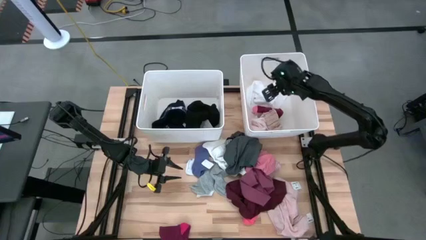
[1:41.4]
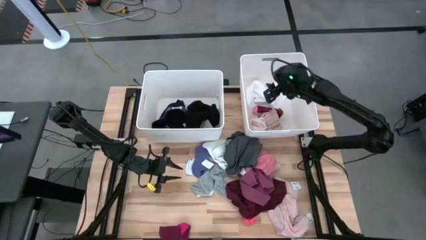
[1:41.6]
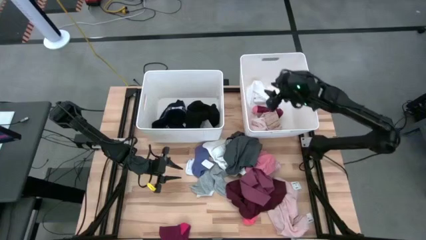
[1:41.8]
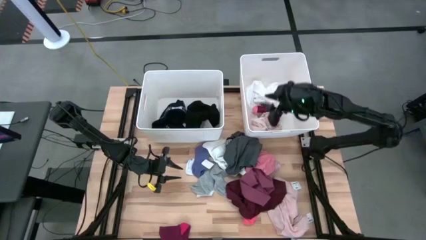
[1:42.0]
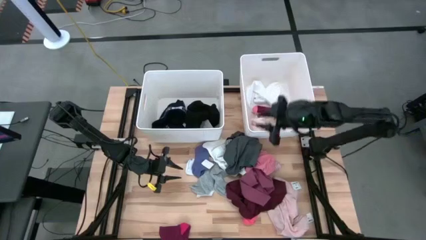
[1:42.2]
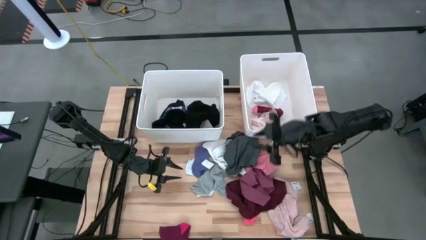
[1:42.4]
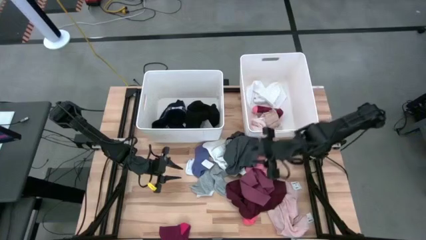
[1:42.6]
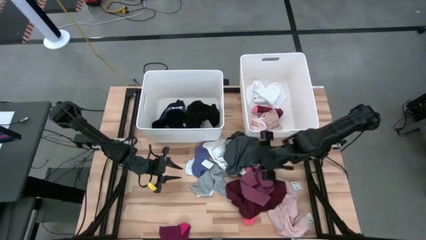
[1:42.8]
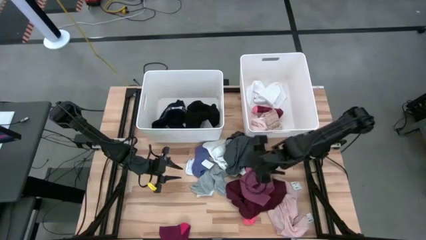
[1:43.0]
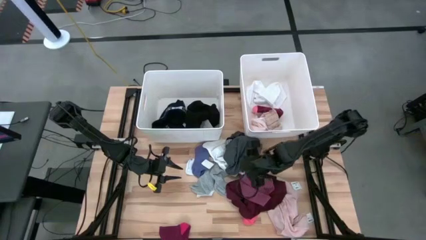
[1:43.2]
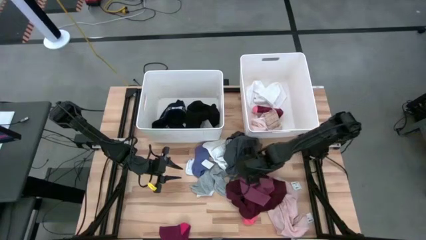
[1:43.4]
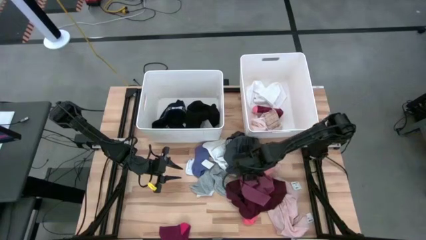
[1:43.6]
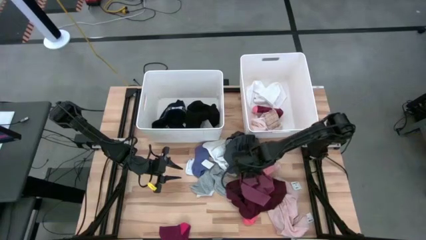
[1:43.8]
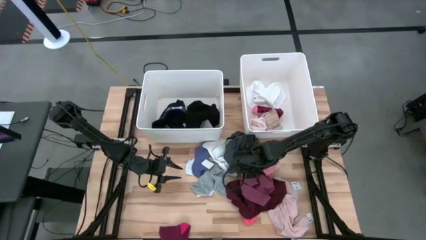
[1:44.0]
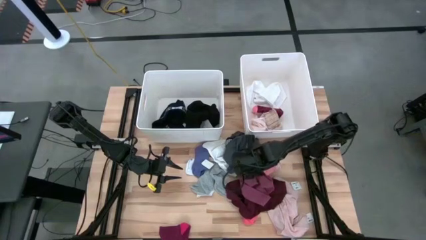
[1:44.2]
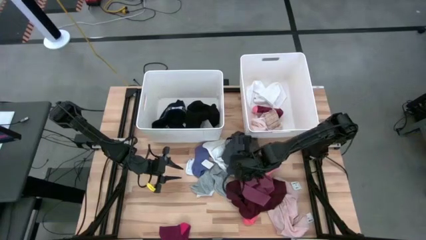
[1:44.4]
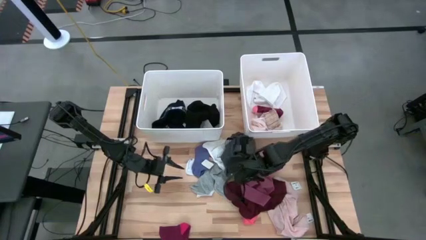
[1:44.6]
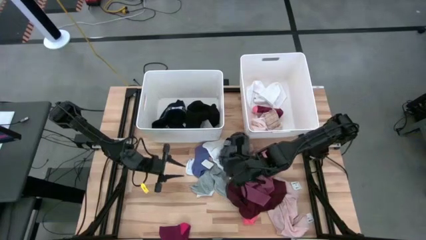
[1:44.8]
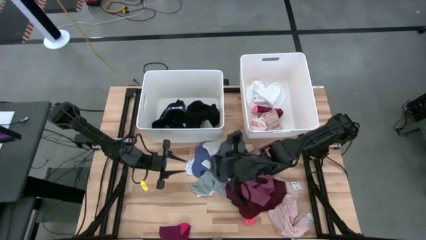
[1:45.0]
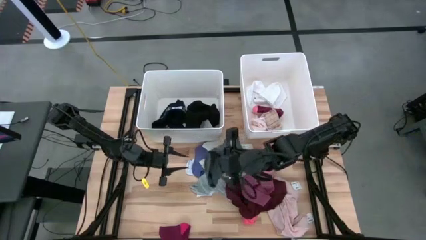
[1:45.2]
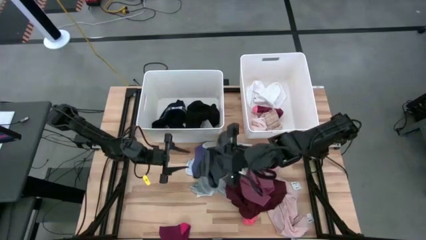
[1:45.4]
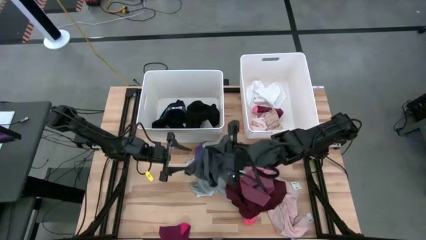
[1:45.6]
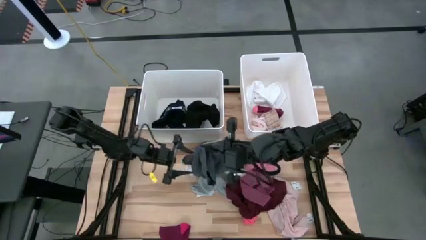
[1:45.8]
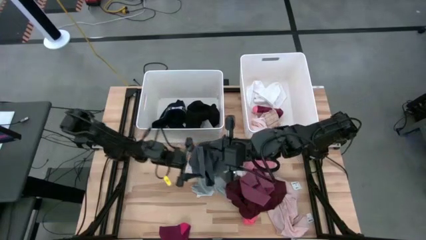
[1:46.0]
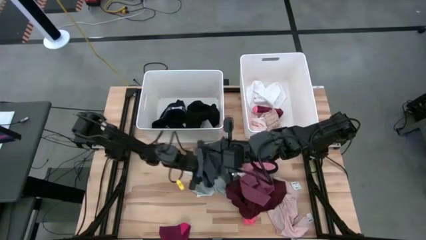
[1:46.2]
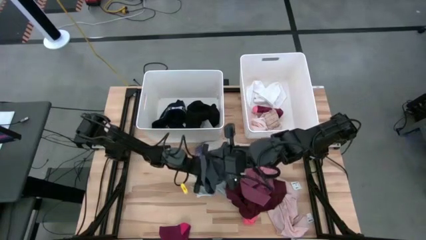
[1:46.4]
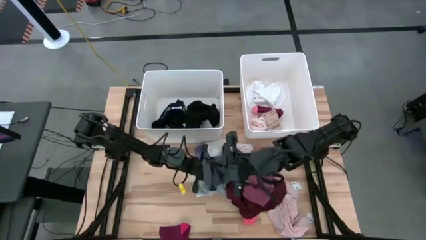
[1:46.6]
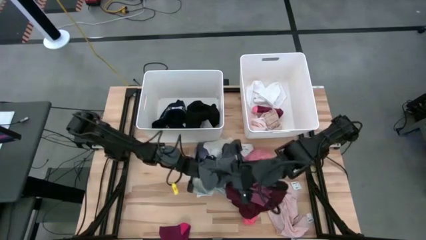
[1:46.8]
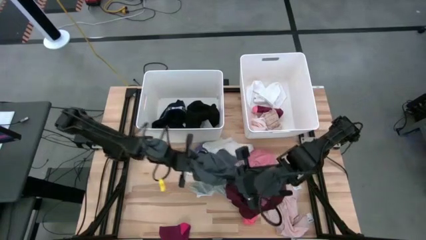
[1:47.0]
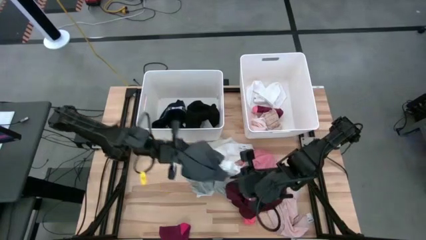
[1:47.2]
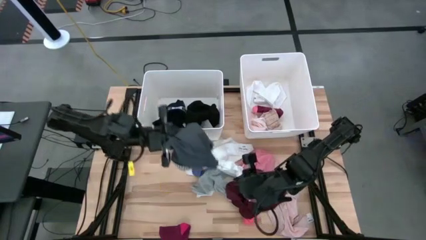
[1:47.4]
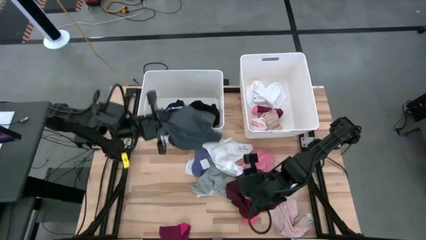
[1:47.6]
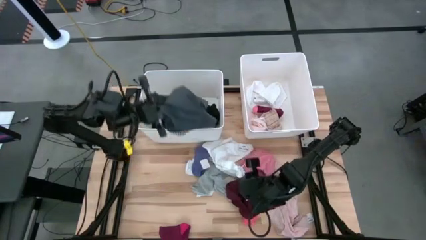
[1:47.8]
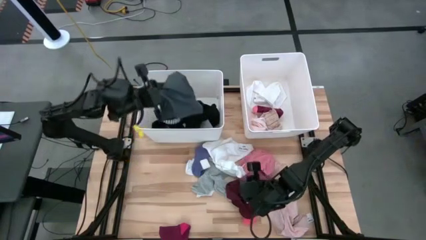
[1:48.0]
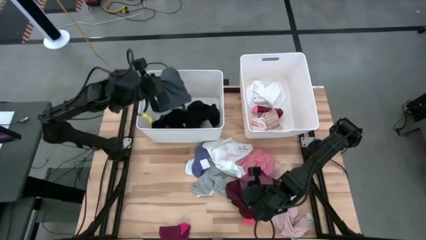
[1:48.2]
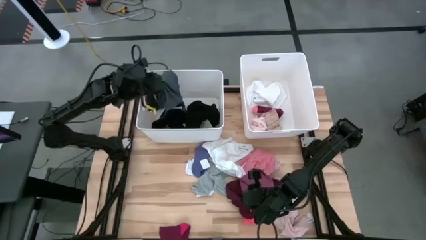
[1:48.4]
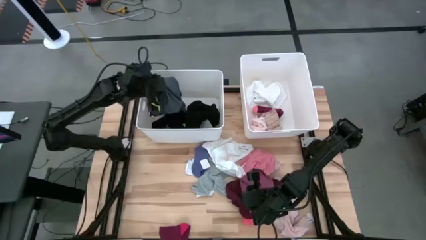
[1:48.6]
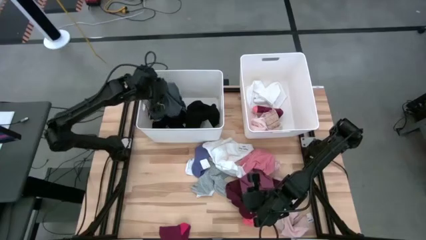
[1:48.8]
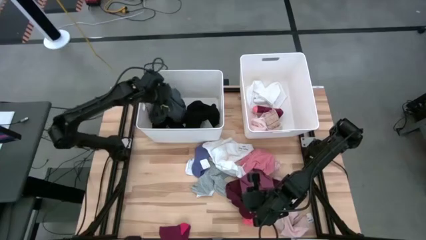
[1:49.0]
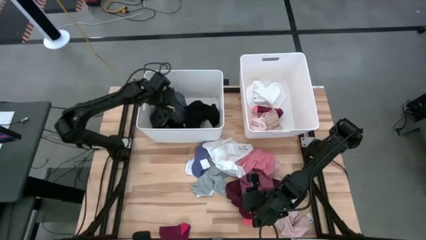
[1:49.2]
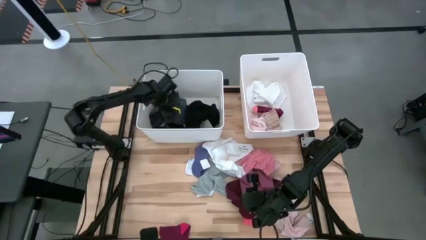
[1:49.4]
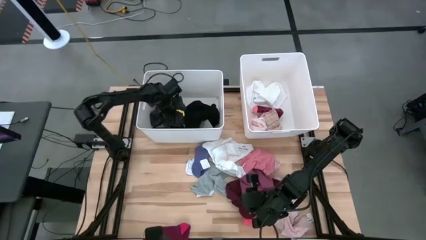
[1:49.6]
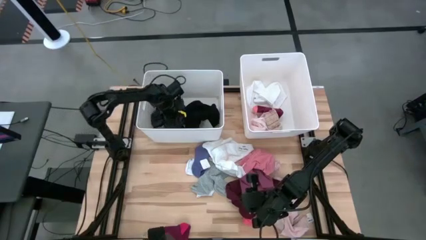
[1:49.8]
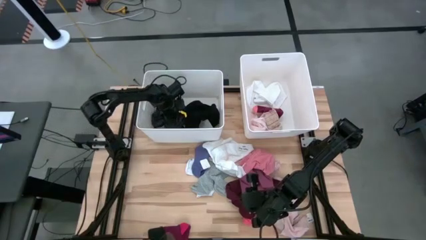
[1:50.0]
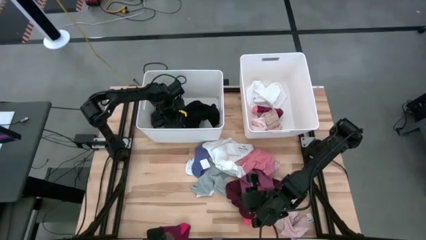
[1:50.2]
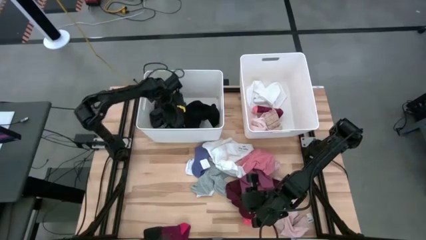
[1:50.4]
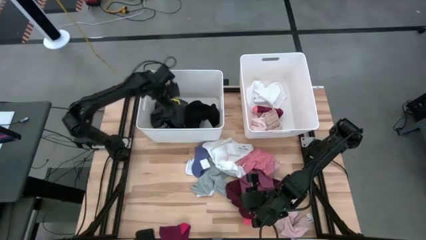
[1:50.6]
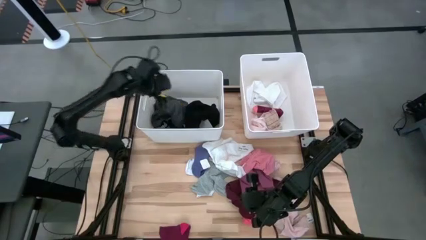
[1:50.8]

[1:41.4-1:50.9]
Task: Sort clothes
Put the gray underwear into the left white laundry organizer
